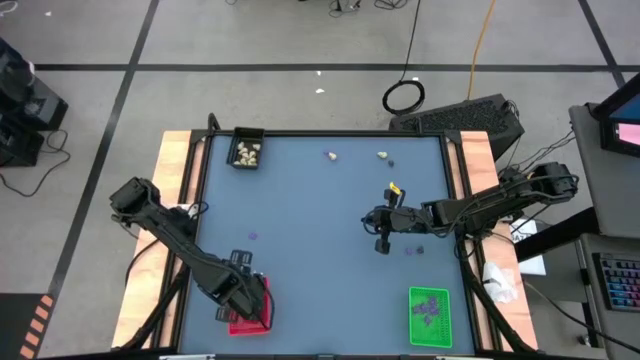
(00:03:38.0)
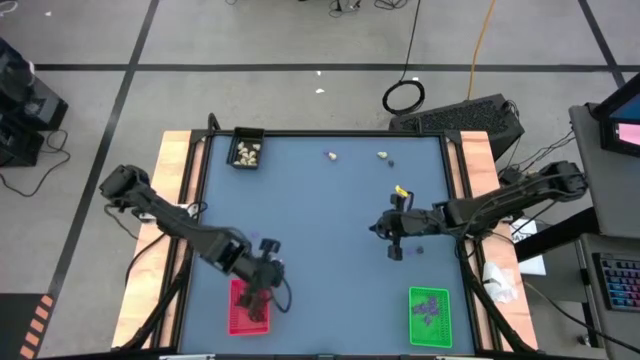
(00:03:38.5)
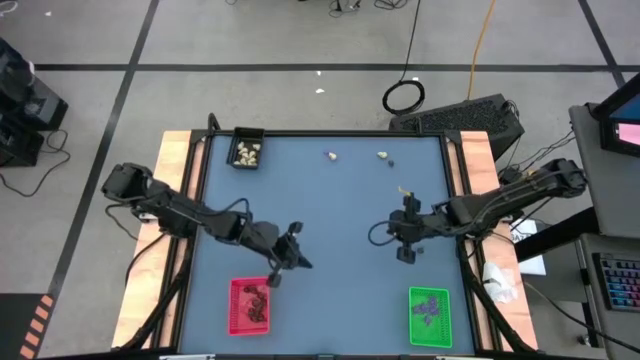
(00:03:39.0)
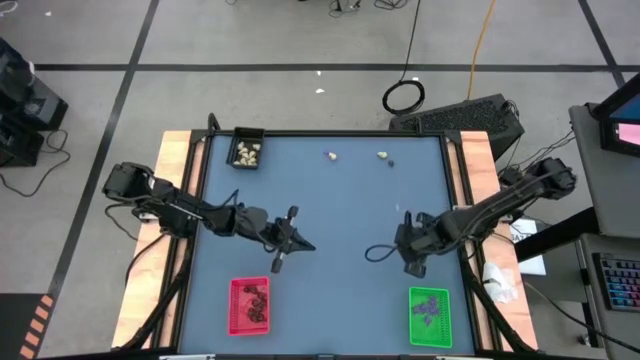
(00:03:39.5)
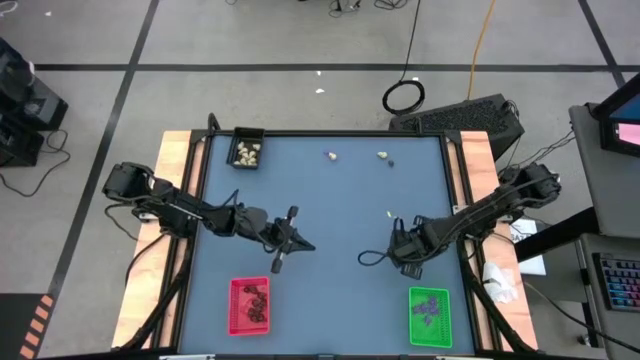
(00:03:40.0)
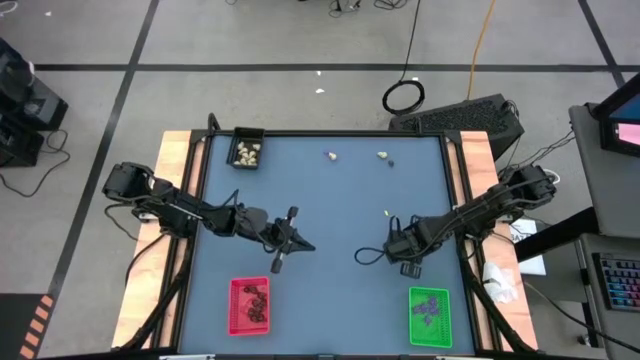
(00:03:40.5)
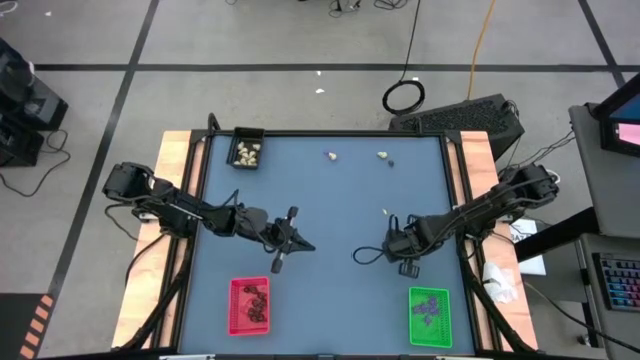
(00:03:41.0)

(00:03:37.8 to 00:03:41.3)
Task: Sort Halloween decoration
Put the violet spider toy into the green bin

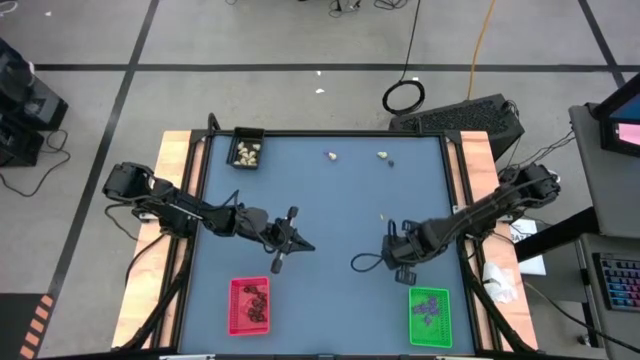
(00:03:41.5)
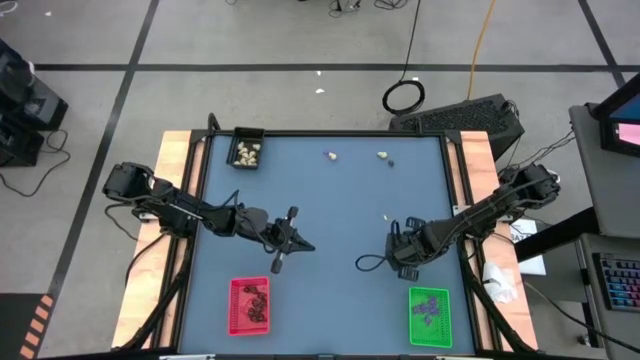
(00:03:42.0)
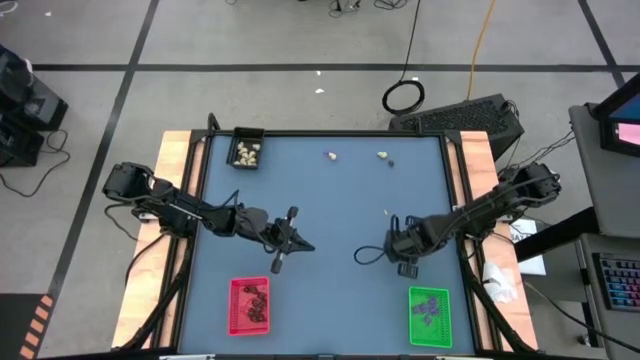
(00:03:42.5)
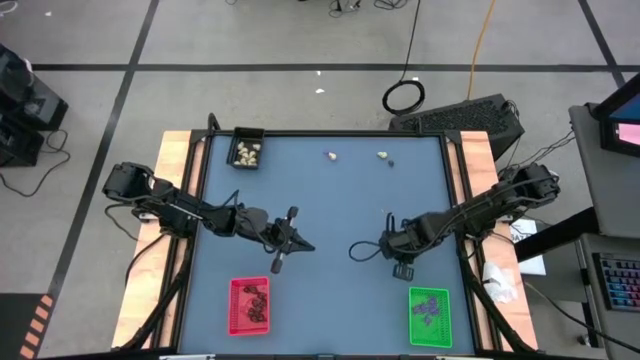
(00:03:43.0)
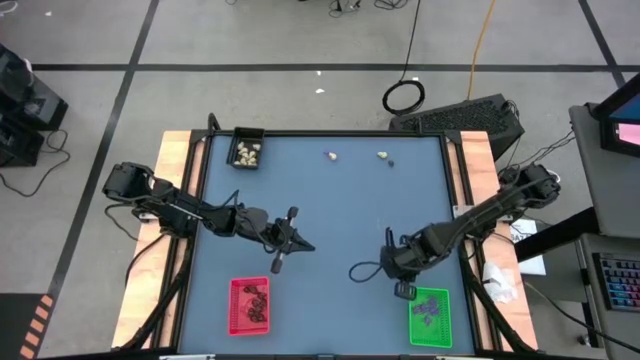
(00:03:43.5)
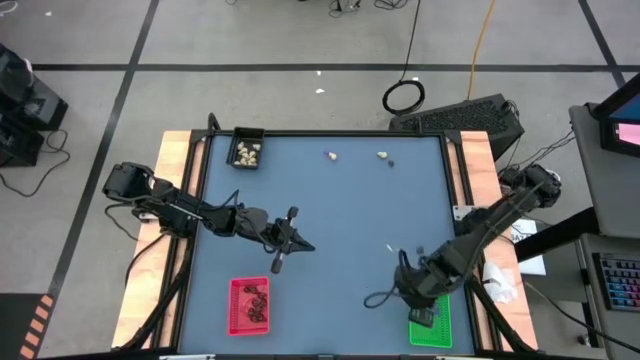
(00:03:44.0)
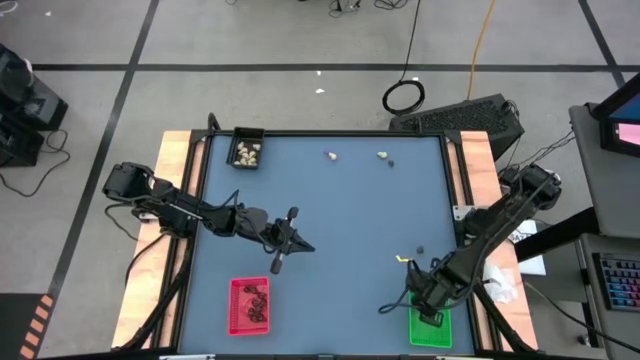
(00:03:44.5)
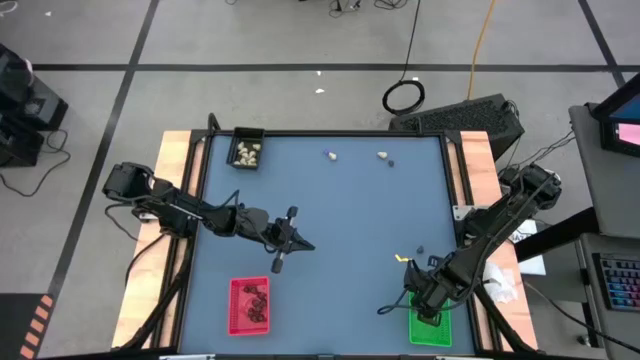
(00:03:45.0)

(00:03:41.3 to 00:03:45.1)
Put the violet spider toy into the green bin

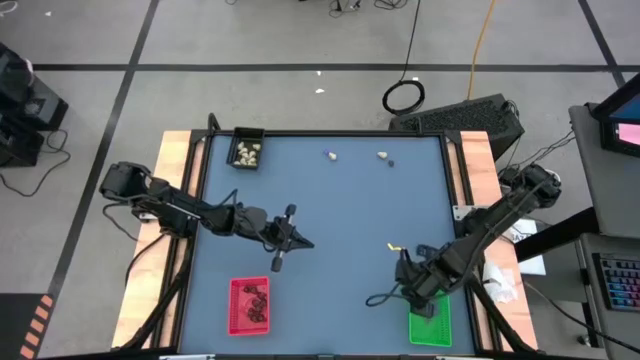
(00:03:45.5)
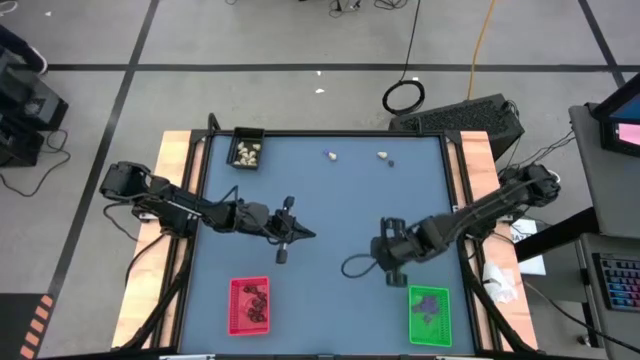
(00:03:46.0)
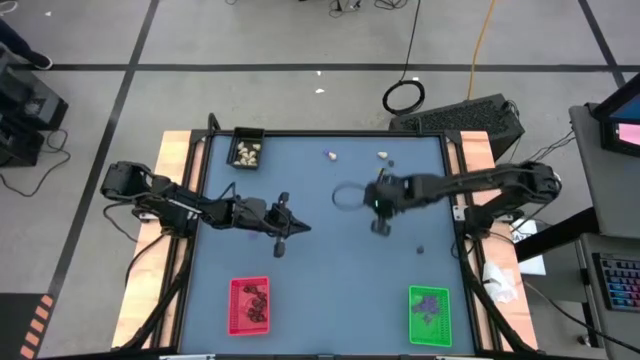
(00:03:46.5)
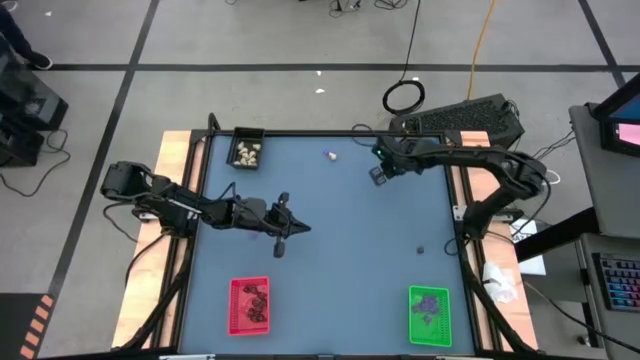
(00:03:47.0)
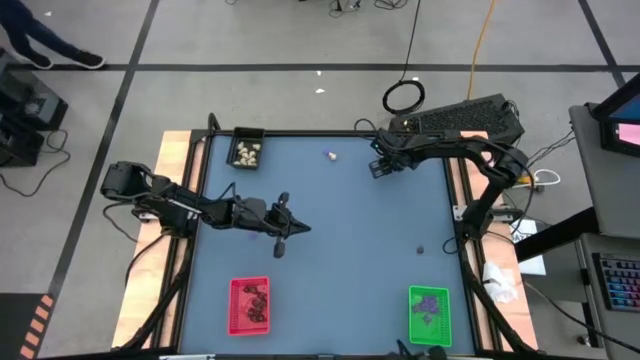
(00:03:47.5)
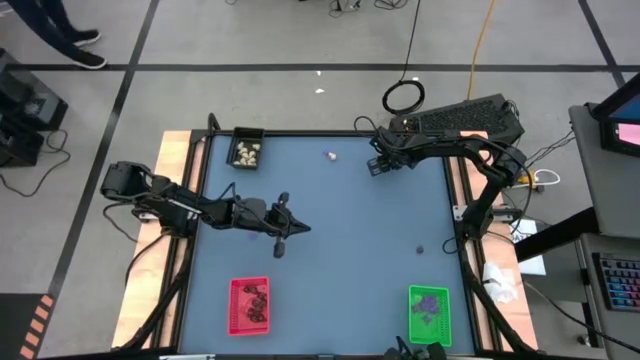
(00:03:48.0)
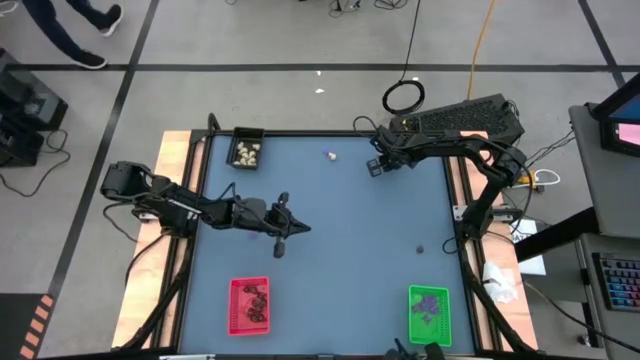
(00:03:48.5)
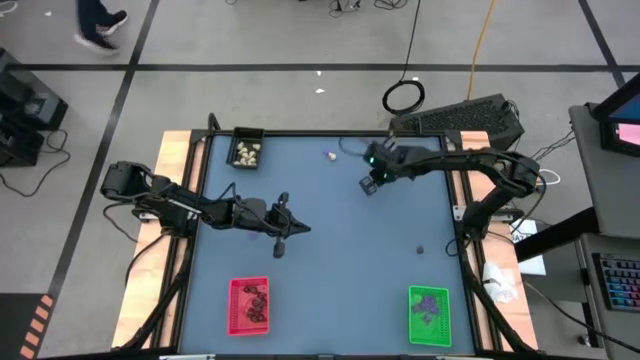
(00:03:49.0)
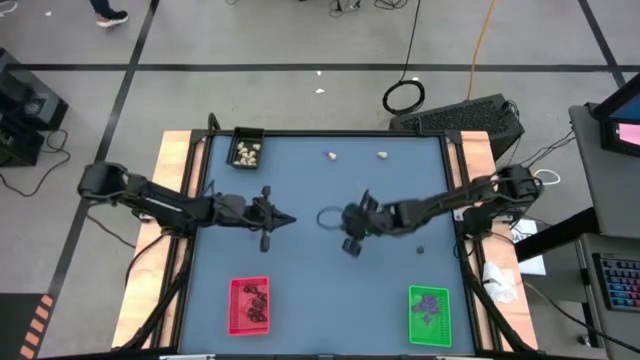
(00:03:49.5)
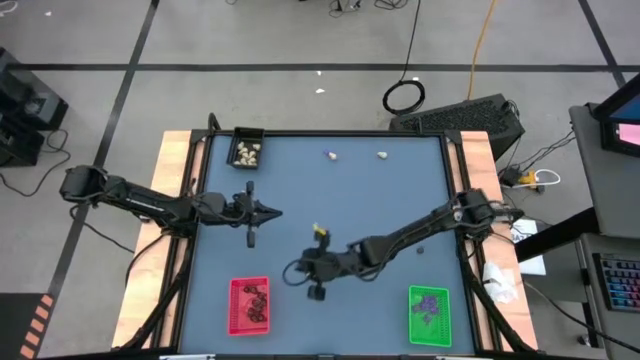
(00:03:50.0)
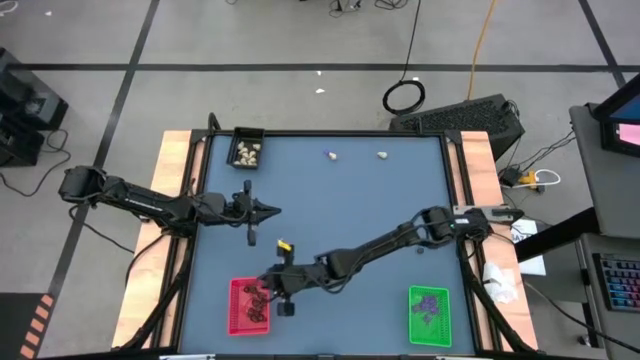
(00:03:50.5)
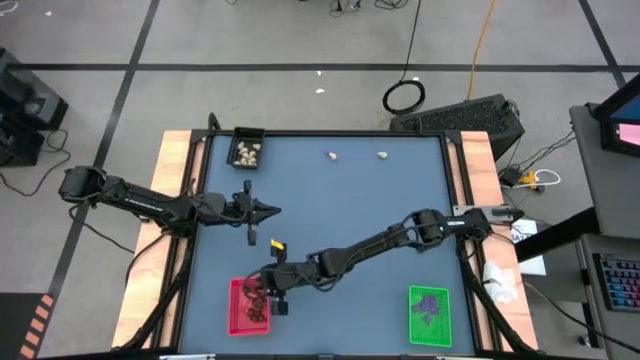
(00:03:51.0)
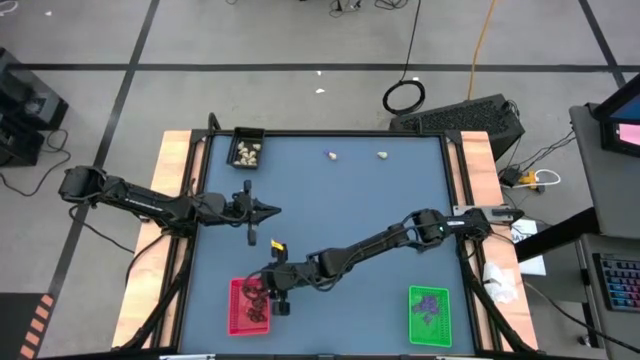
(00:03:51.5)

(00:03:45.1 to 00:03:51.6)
Put the black skull toy into the red bin

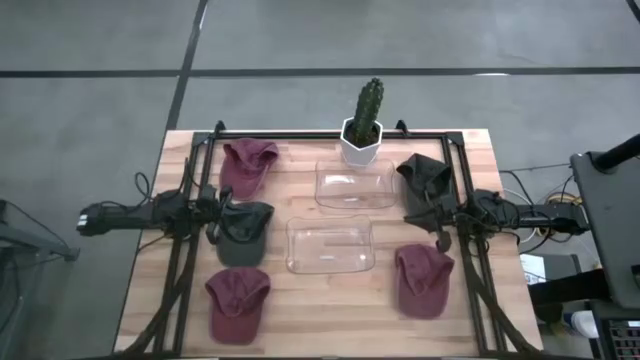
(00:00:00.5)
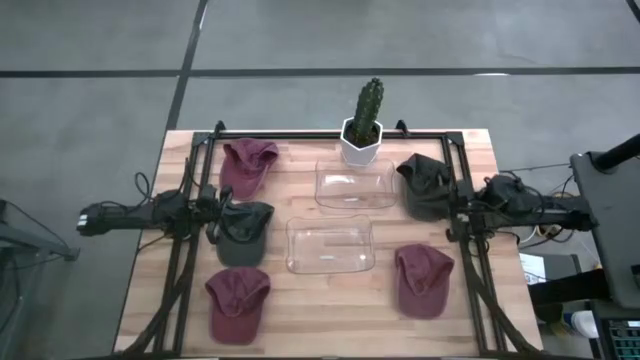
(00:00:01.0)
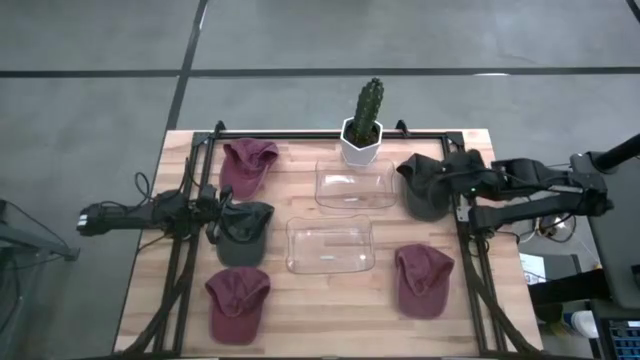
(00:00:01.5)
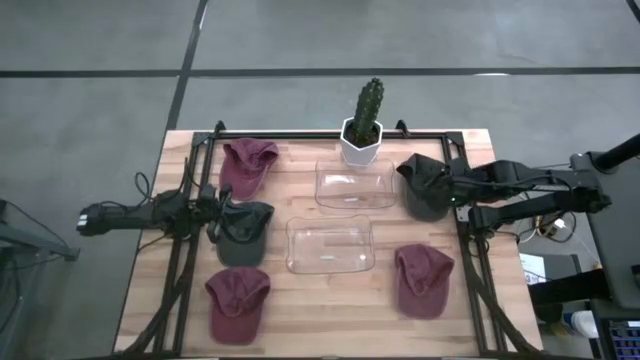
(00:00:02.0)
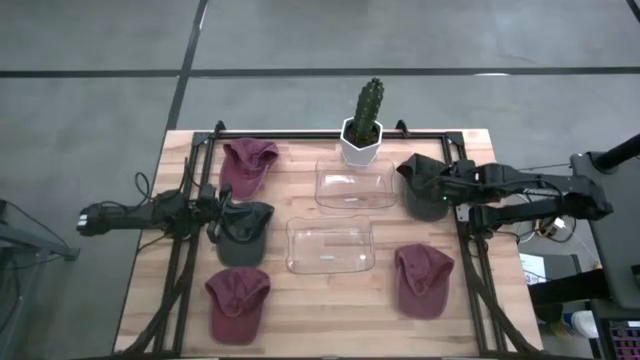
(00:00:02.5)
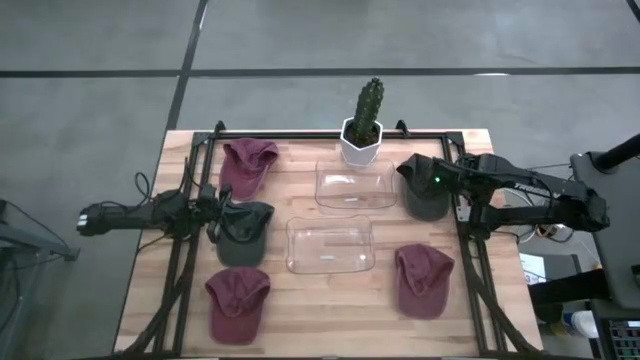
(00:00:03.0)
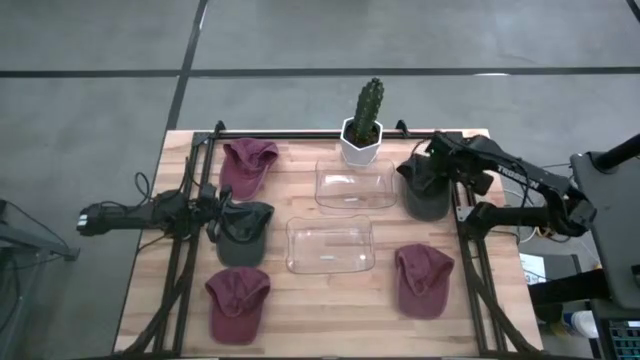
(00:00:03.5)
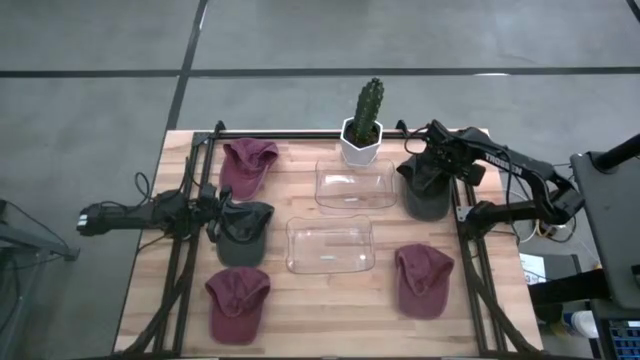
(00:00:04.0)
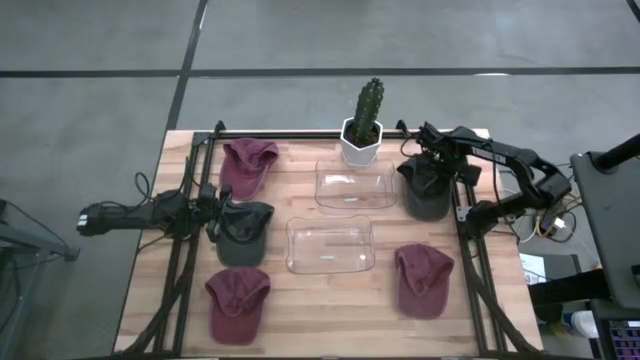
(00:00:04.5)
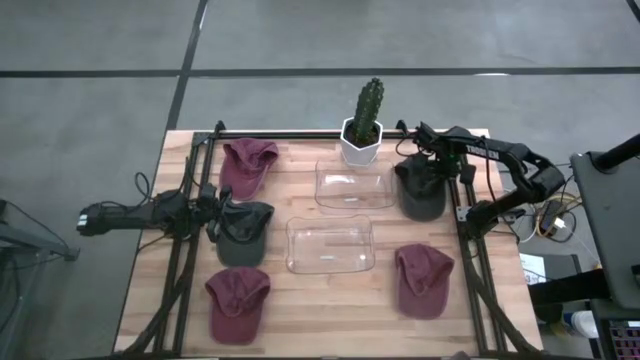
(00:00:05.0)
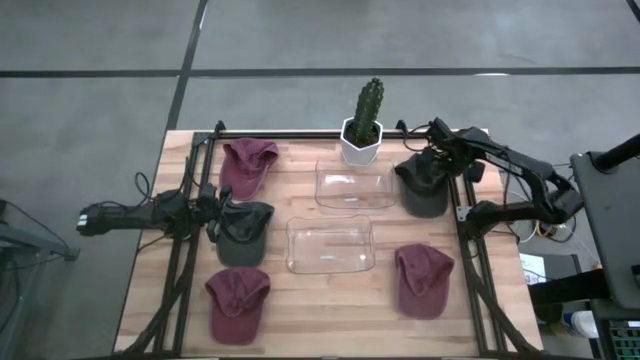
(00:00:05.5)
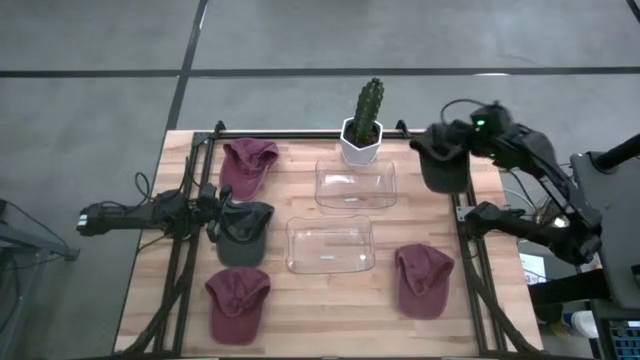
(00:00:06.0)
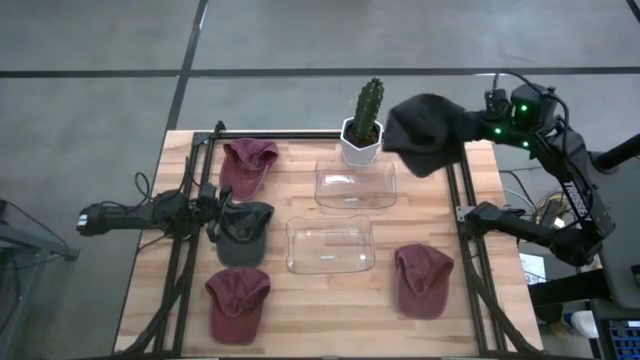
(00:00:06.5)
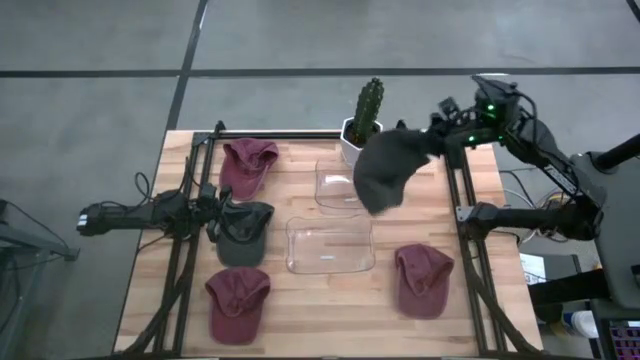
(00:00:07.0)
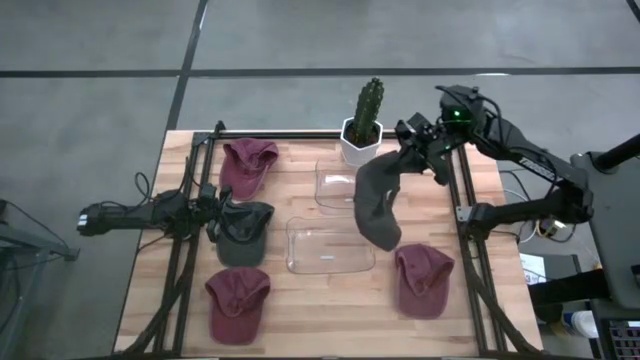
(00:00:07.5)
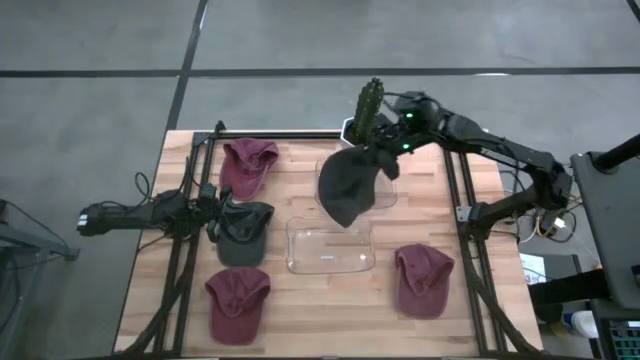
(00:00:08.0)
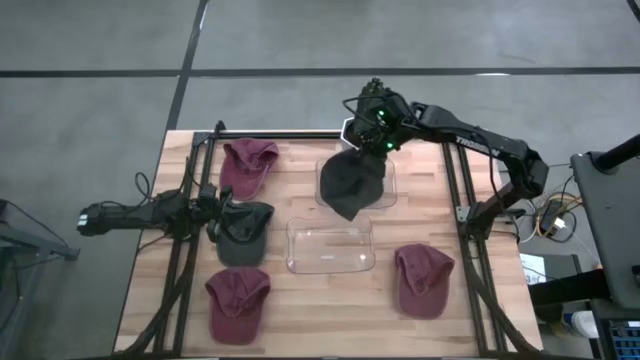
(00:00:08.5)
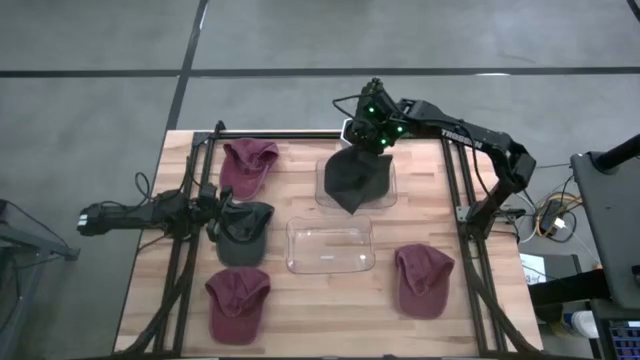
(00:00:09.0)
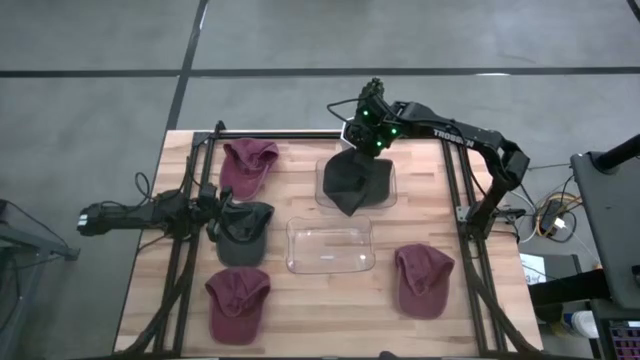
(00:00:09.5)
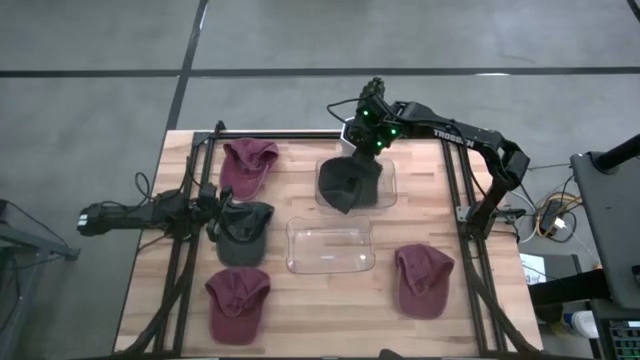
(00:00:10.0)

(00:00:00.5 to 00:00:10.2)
Task: Pick & Place hat
Put the right black cap into the top transparent bin
